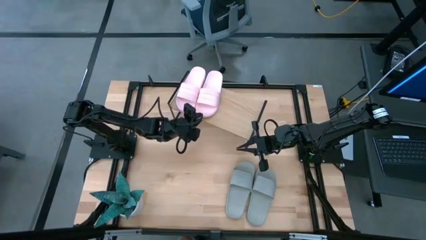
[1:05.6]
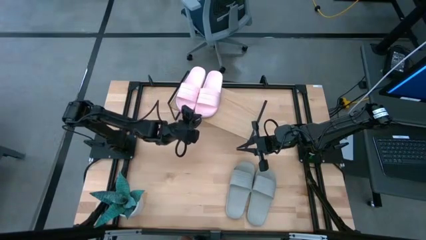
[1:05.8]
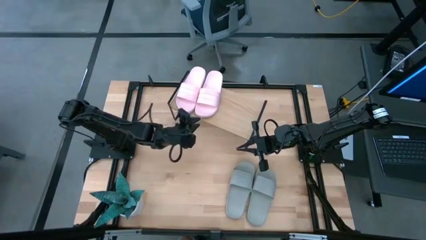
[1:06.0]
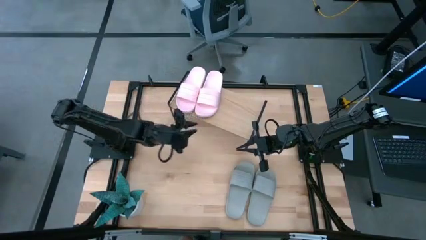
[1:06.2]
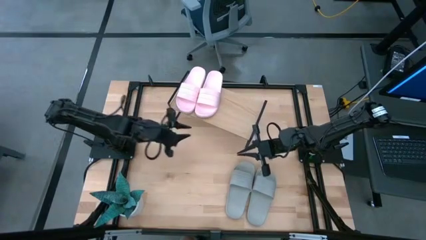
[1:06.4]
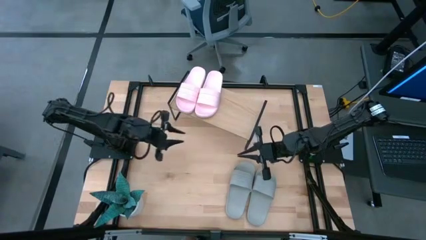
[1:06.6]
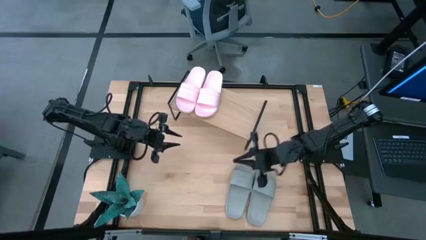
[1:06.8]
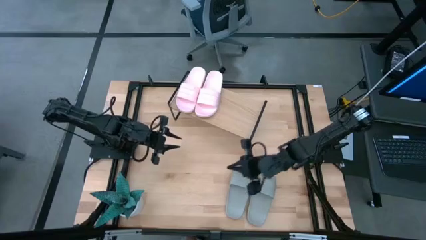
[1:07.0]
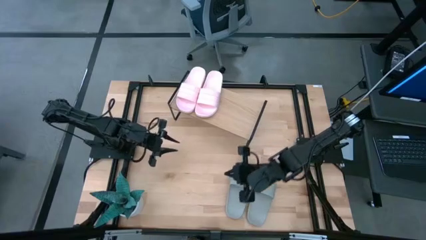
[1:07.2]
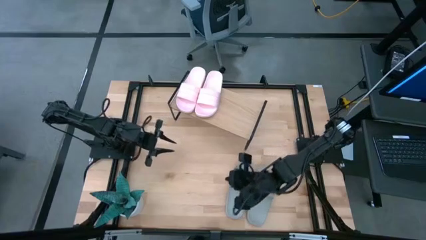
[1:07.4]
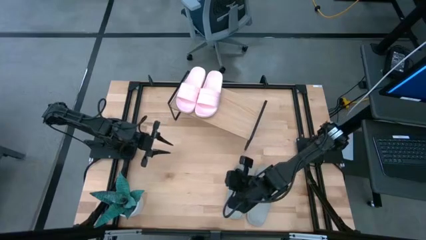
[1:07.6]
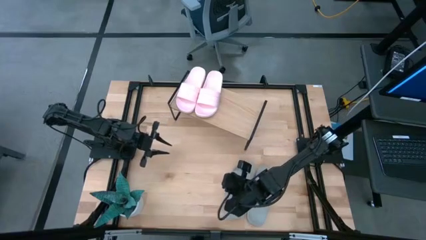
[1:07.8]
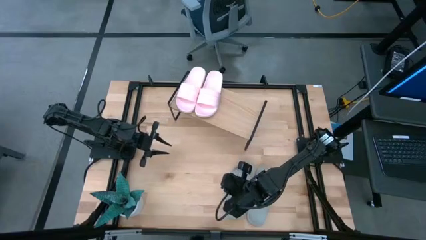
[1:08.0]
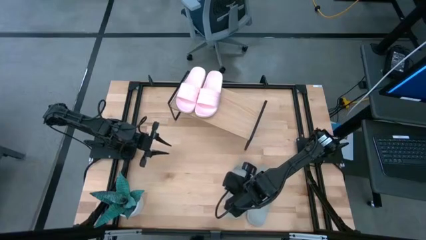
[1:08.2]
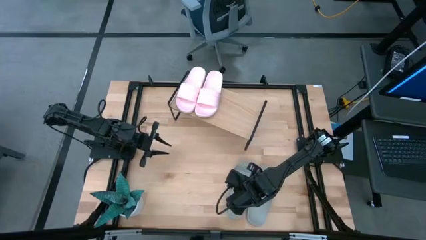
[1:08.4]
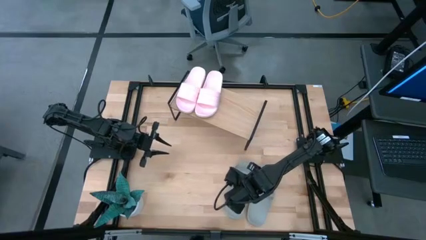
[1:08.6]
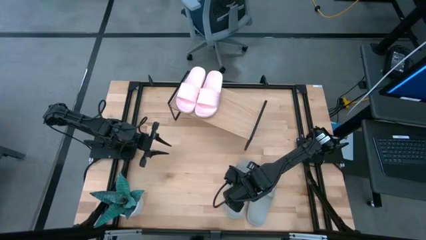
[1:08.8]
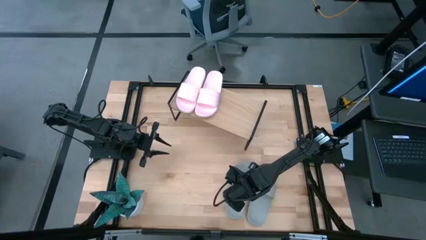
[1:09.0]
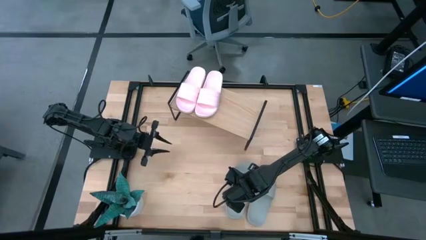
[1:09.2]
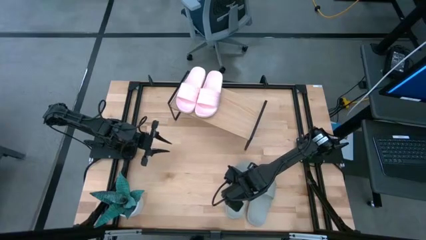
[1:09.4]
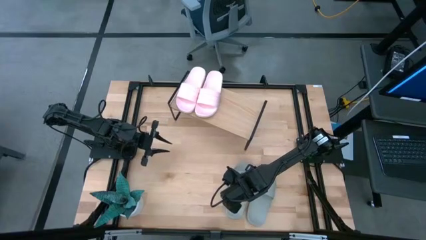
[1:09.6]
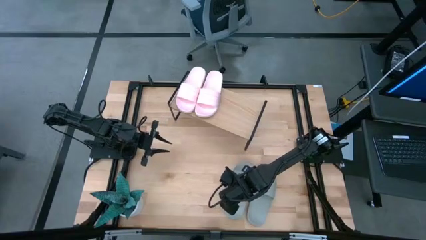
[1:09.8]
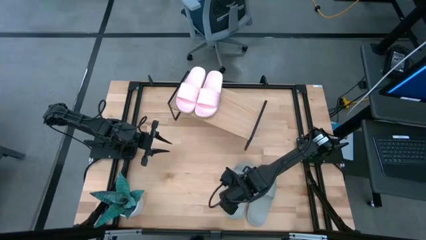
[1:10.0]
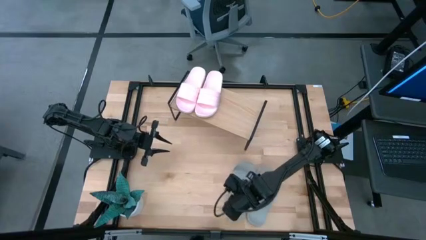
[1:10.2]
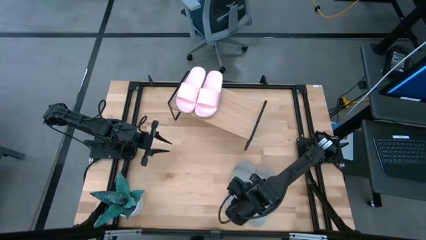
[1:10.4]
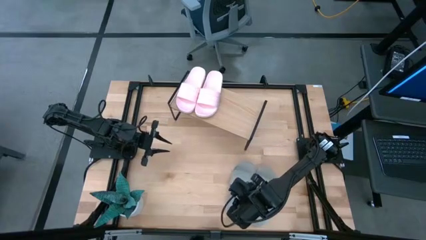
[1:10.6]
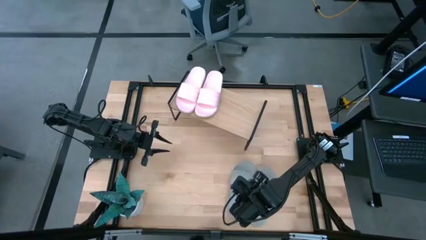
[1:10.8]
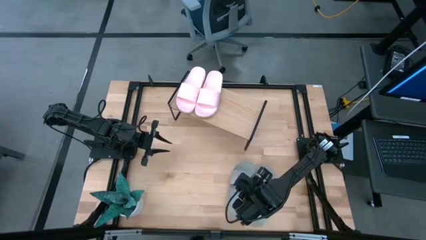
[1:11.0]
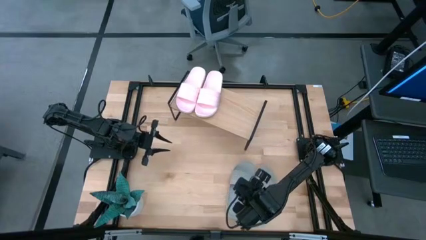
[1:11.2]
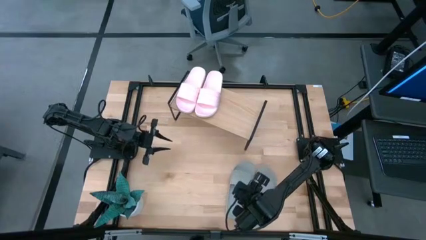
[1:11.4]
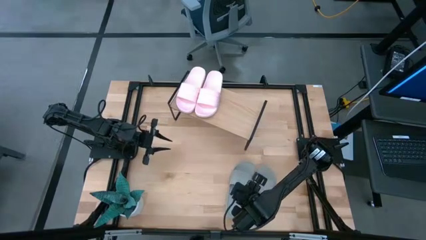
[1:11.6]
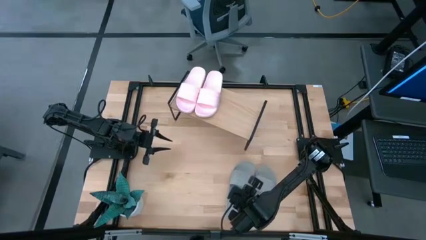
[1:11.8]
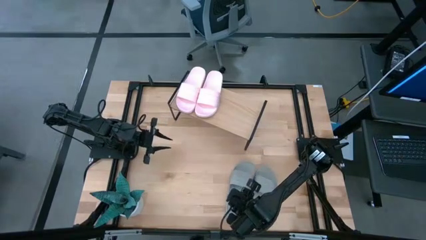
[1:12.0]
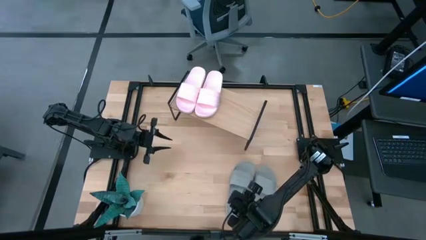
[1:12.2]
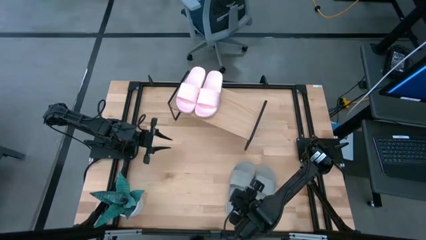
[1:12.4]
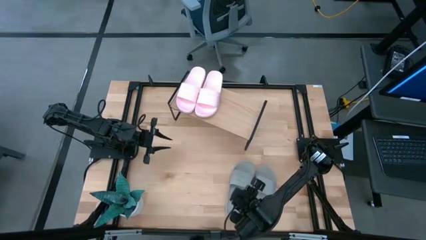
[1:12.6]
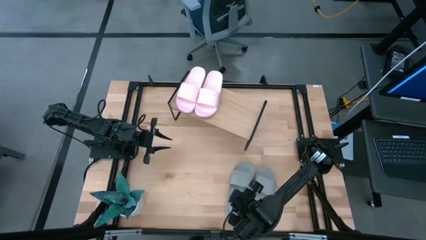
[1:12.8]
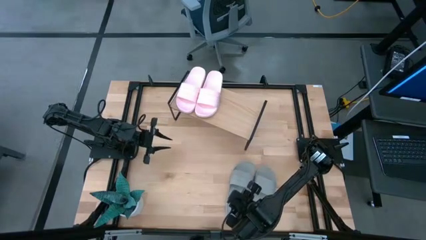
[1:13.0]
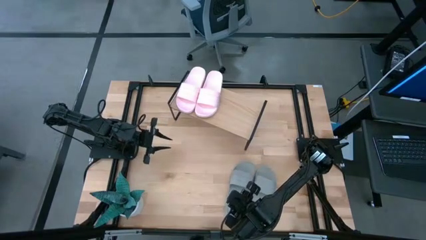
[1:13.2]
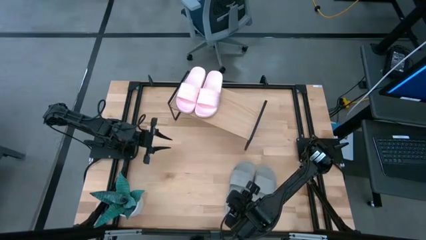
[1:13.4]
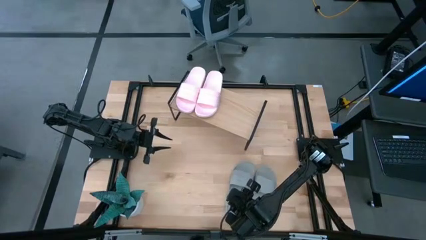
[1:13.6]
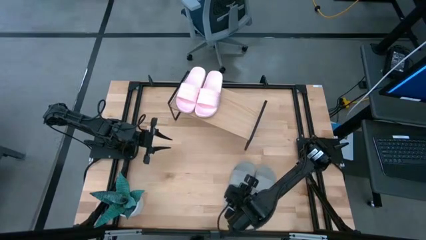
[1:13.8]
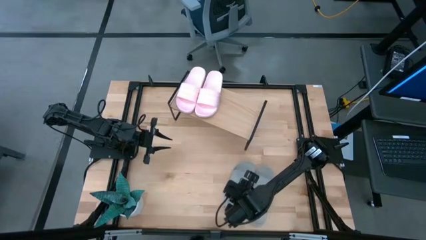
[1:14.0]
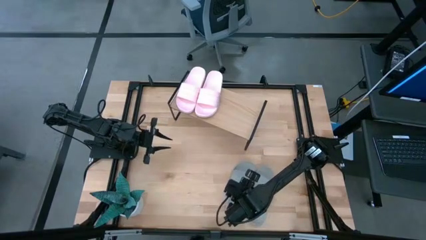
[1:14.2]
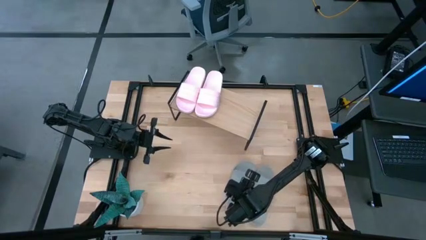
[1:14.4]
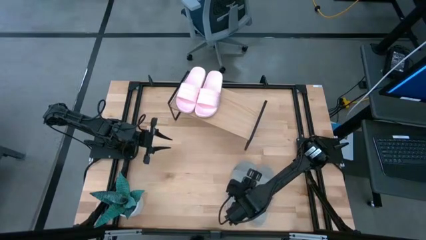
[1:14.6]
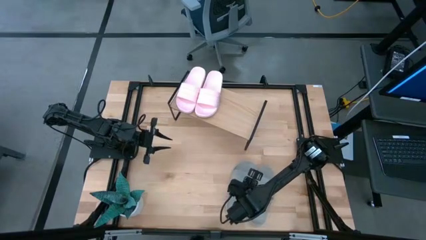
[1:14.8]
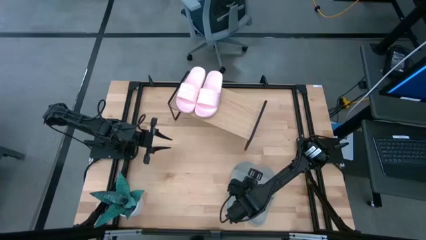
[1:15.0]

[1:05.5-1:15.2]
Task: Pick and place slides into the shelf
Put the left gray slide on the shelf

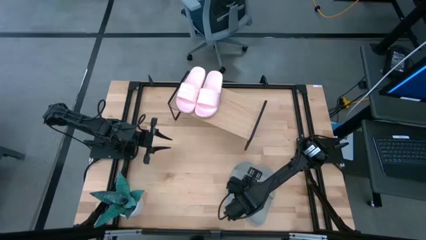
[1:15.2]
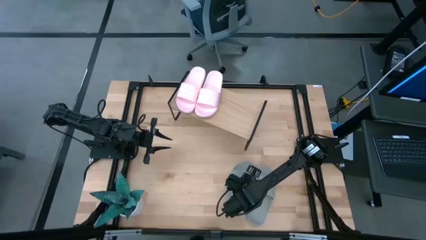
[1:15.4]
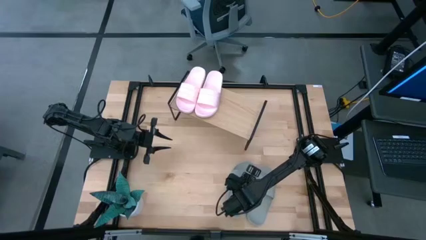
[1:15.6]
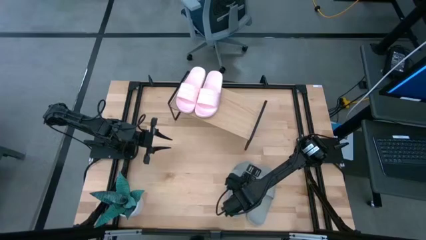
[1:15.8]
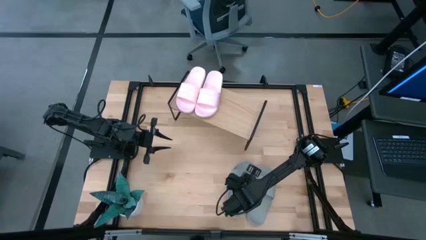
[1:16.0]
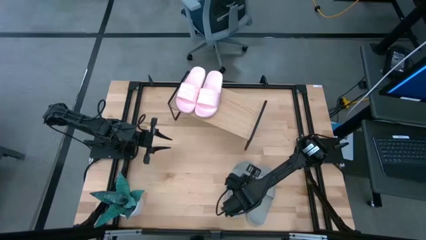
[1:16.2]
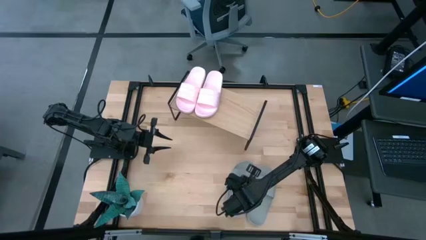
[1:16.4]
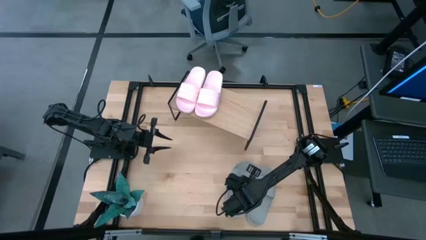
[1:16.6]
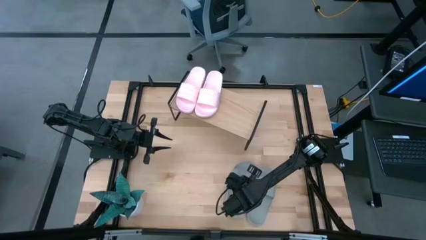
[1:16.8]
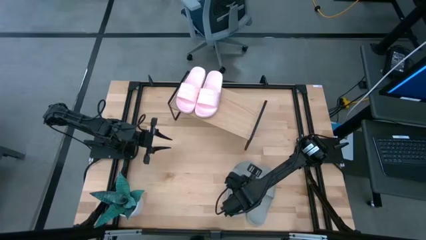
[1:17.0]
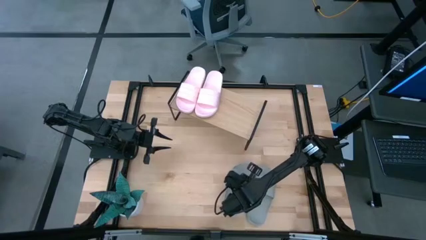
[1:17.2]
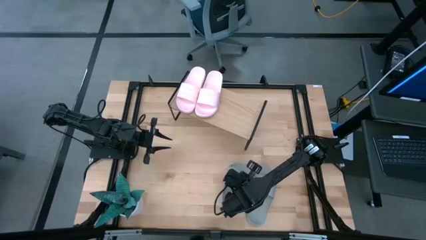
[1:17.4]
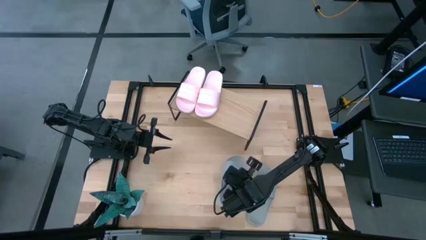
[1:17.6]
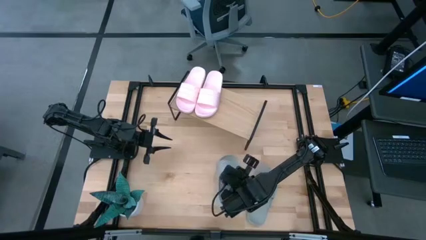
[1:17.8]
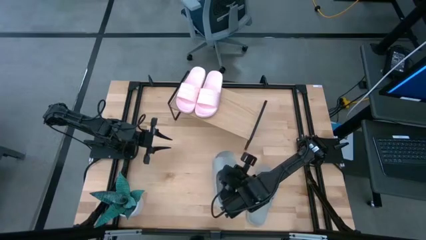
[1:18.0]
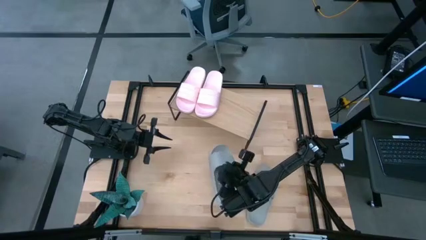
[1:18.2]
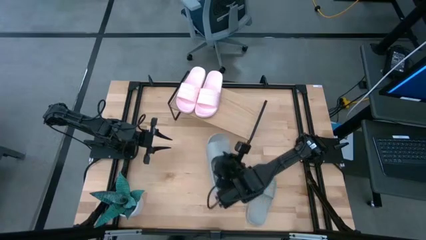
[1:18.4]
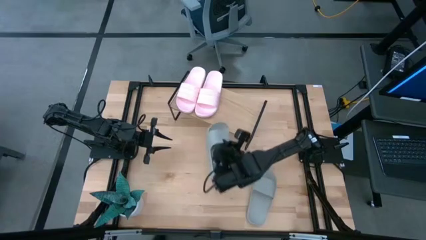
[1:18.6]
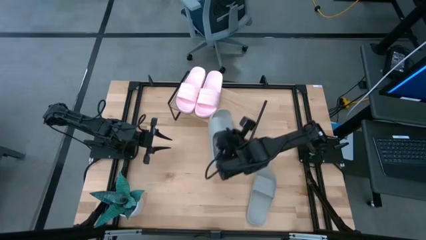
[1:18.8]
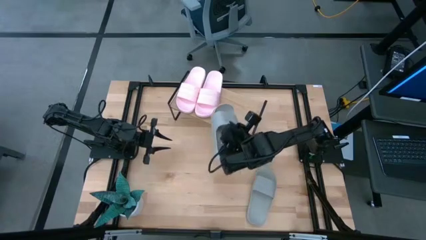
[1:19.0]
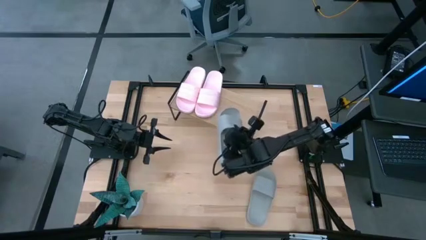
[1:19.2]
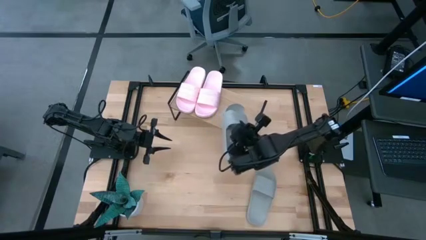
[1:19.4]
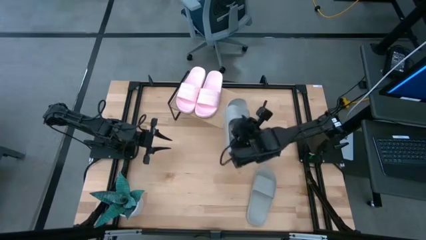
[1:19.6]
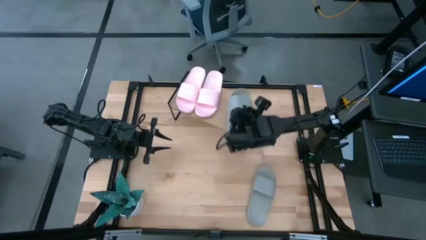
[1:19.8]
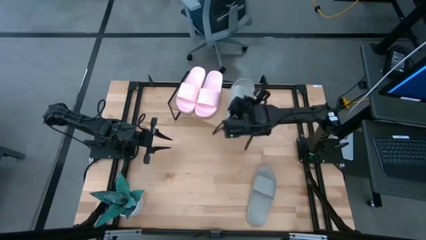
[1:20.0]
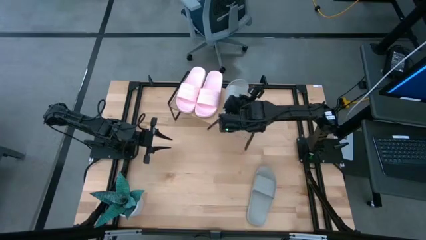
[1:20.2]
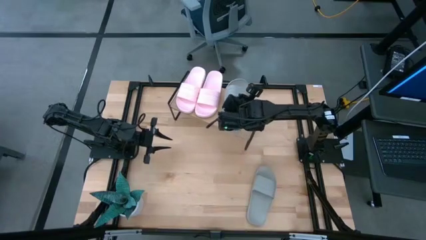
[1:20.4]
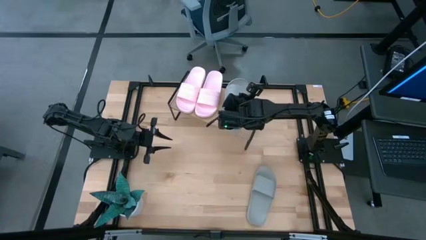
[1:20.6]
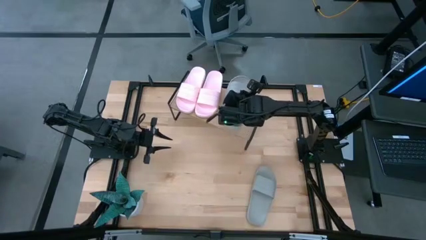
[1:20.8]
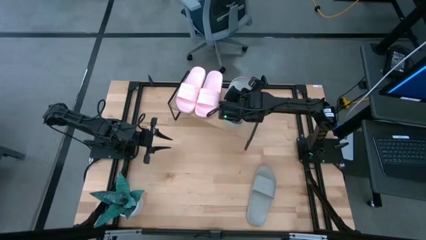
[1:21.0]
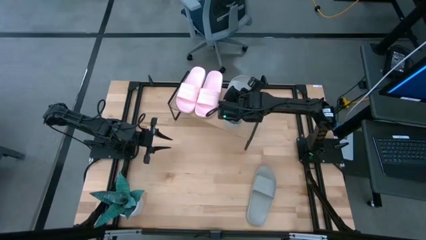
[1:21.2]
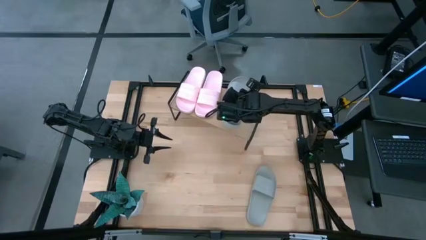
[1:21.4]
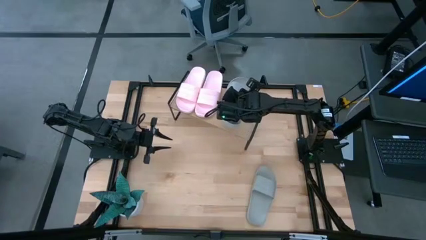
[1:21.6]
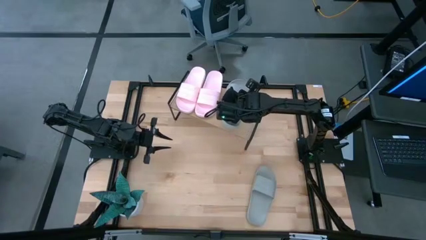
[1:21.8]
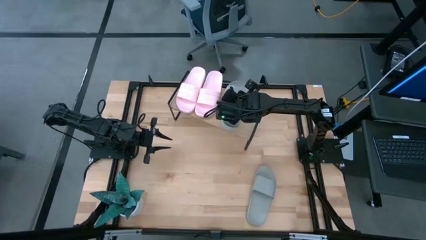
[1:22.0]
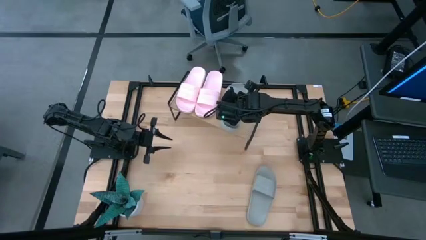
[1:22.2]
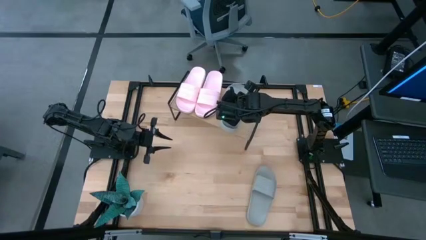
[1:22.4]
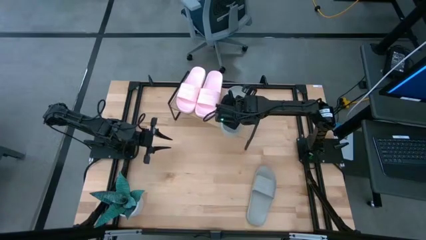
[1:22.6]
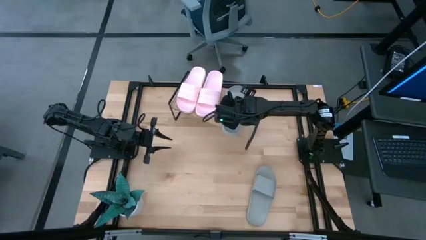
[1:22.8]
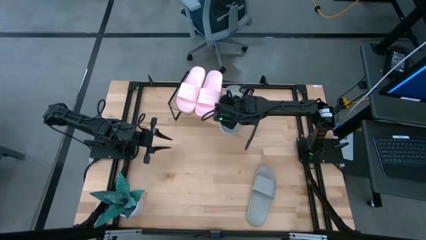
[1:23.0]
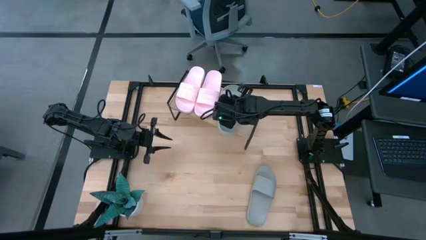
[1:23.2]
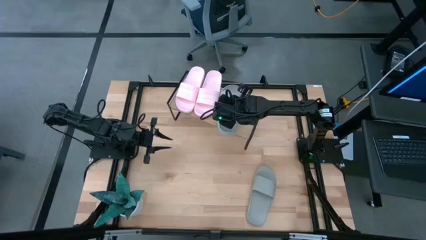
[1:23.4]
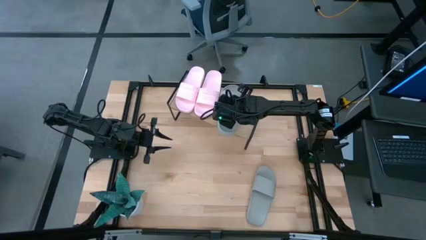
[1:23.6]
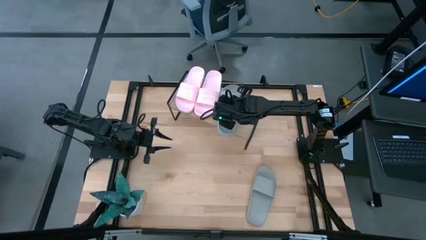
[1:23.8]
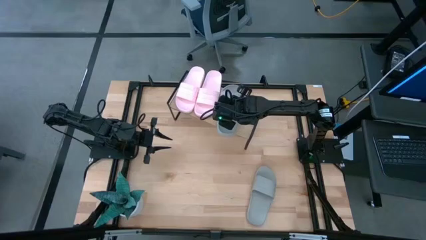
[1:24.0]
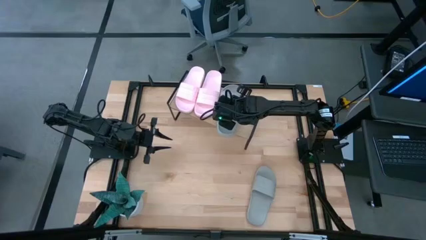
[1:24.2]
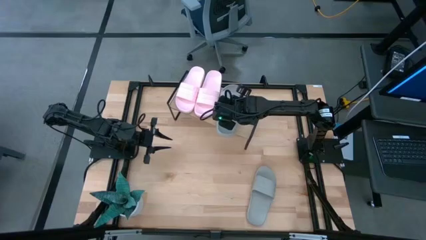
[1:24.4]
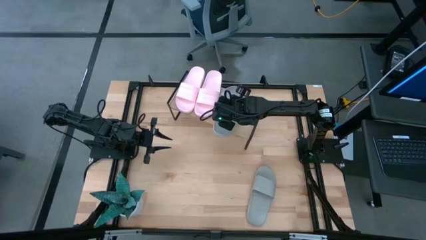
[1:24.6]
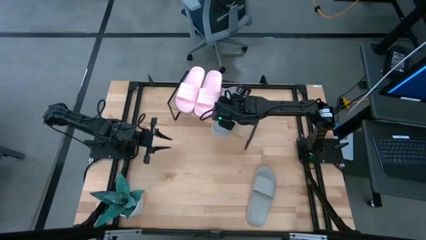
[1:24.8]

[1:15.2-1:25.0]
Put the left gray slide on the shelf
